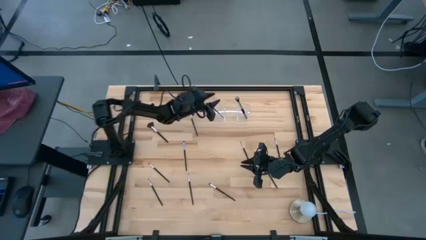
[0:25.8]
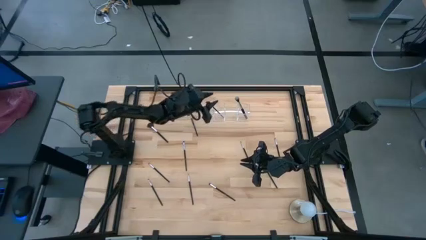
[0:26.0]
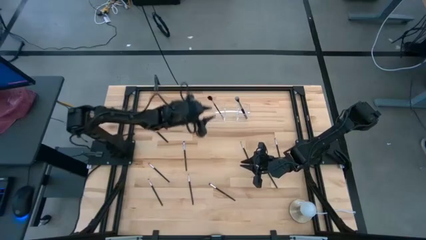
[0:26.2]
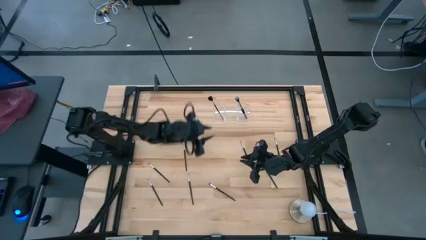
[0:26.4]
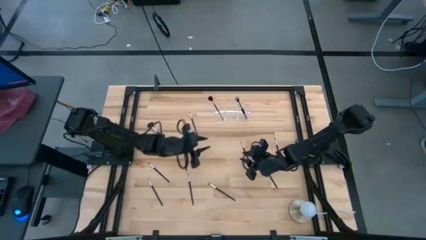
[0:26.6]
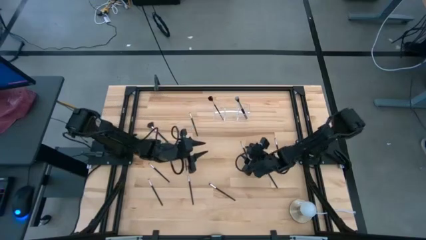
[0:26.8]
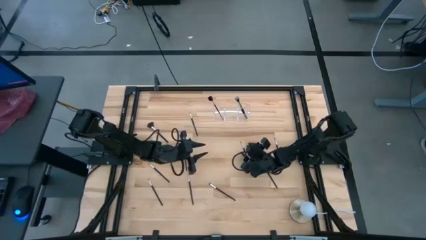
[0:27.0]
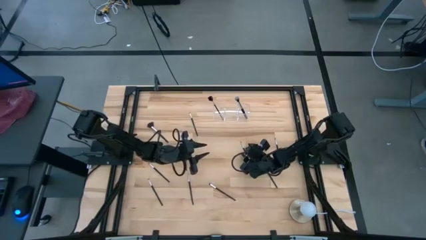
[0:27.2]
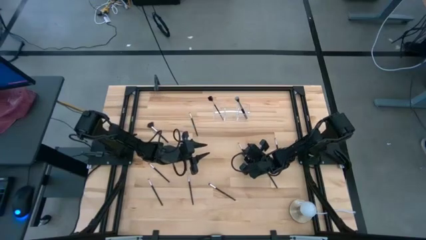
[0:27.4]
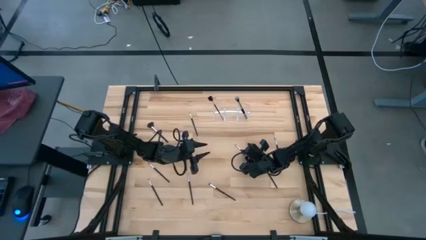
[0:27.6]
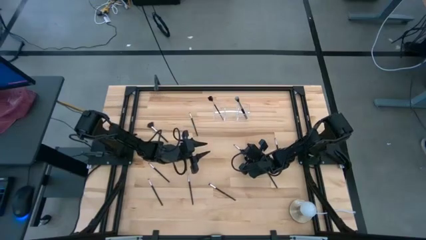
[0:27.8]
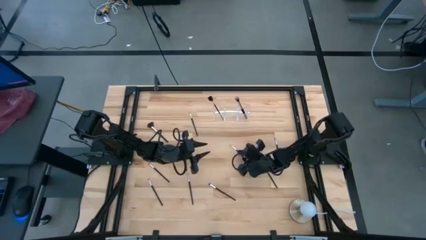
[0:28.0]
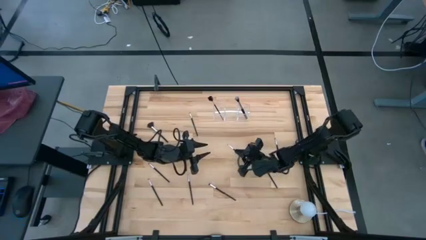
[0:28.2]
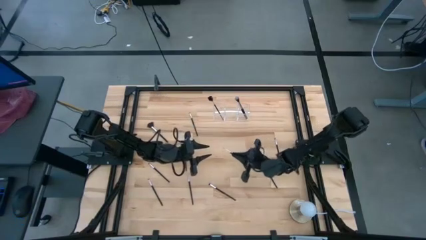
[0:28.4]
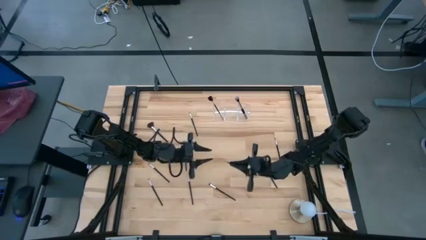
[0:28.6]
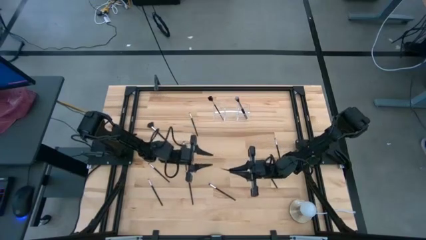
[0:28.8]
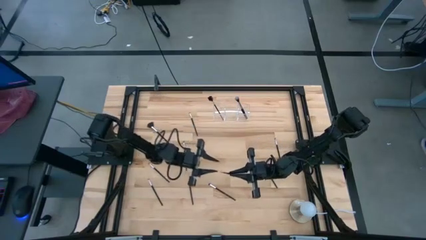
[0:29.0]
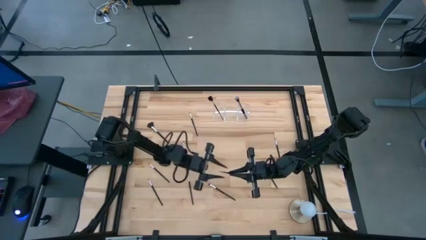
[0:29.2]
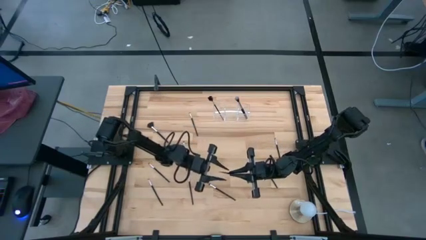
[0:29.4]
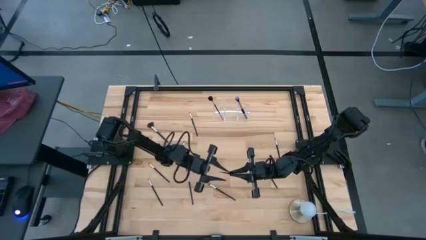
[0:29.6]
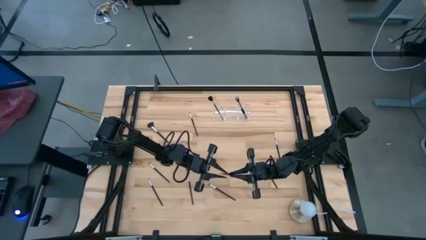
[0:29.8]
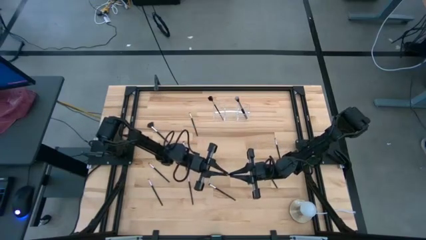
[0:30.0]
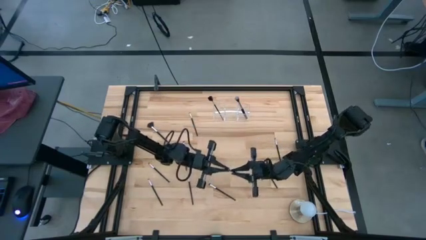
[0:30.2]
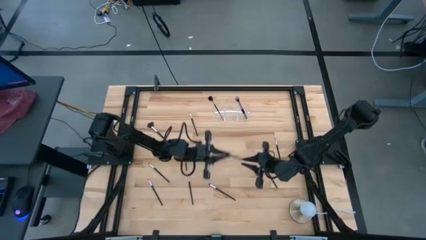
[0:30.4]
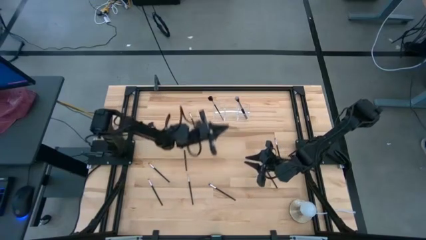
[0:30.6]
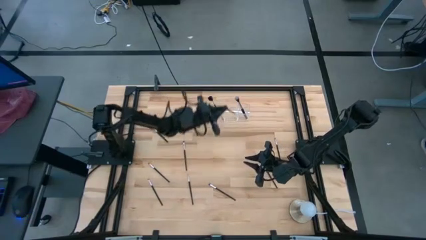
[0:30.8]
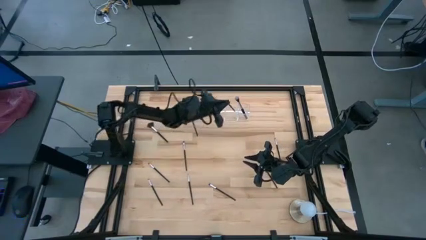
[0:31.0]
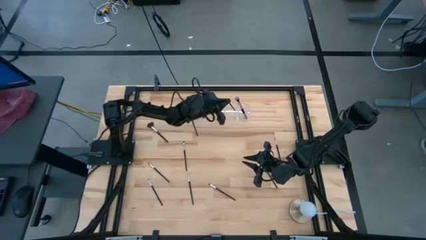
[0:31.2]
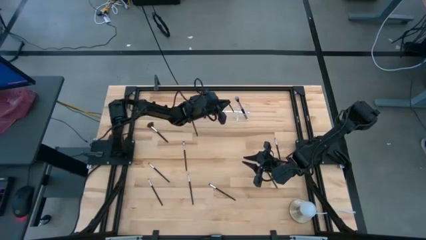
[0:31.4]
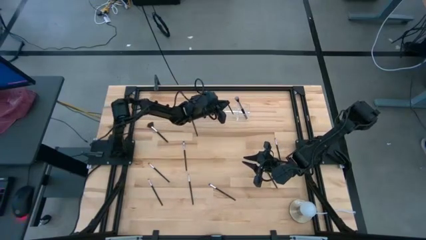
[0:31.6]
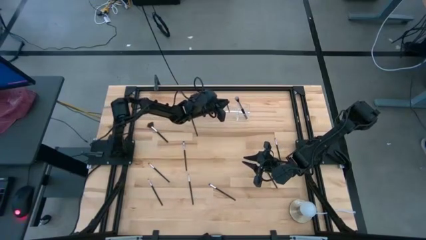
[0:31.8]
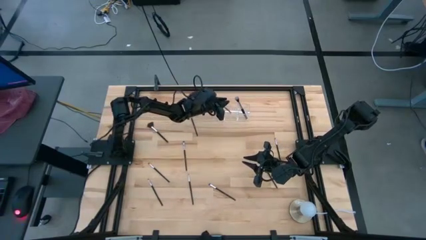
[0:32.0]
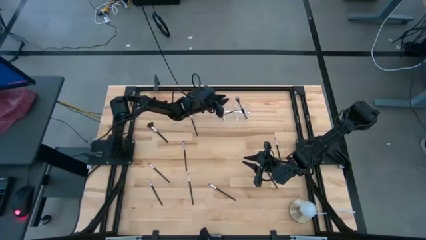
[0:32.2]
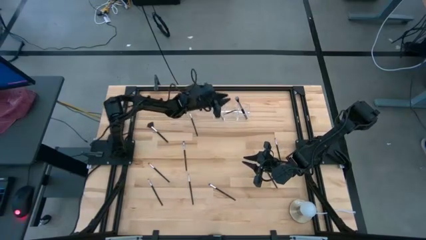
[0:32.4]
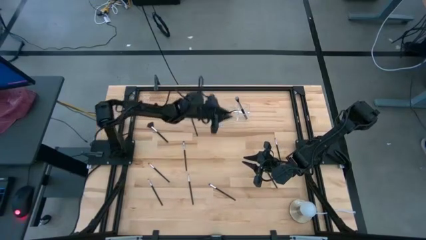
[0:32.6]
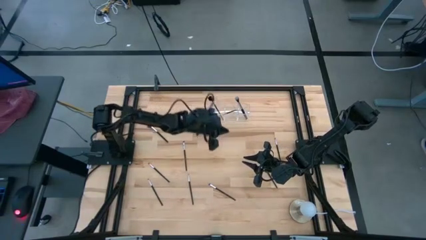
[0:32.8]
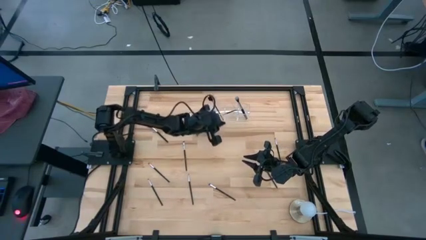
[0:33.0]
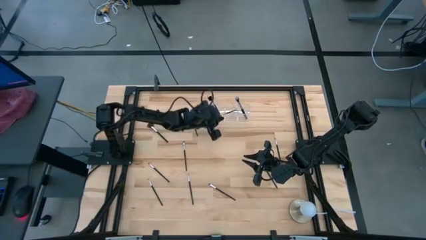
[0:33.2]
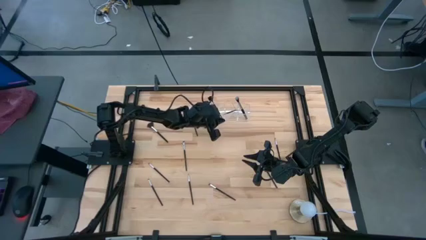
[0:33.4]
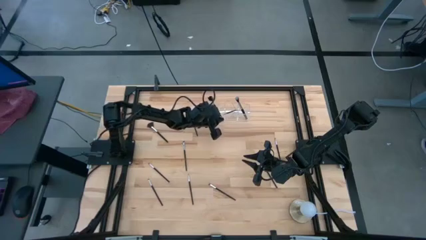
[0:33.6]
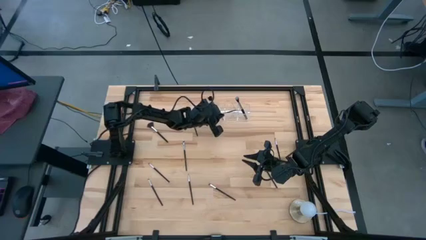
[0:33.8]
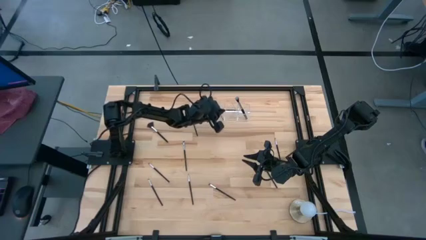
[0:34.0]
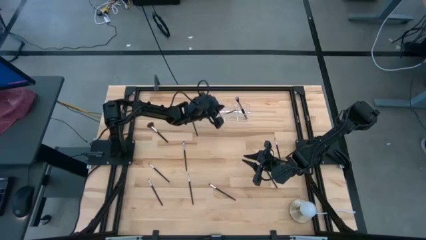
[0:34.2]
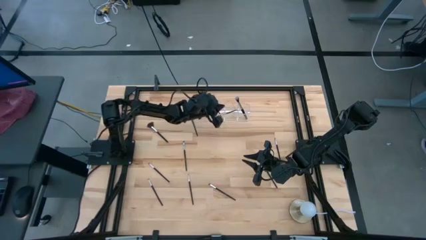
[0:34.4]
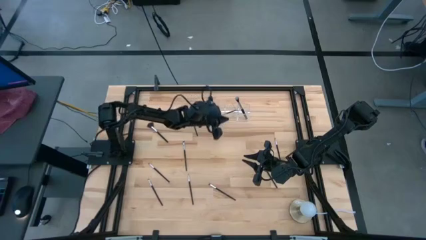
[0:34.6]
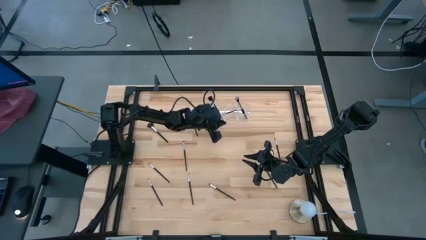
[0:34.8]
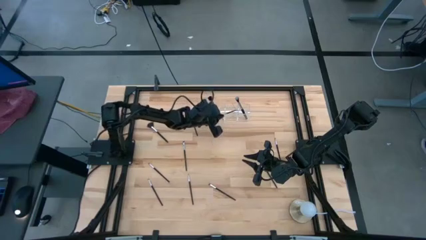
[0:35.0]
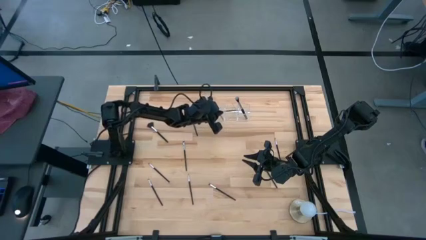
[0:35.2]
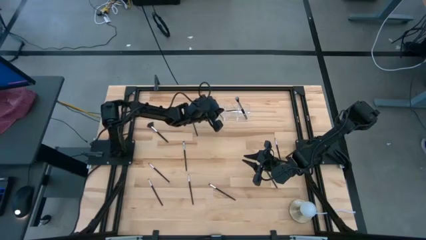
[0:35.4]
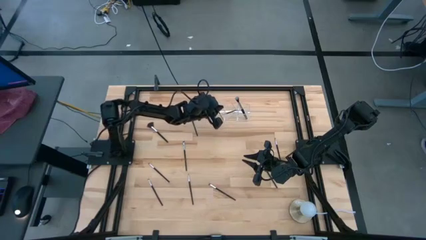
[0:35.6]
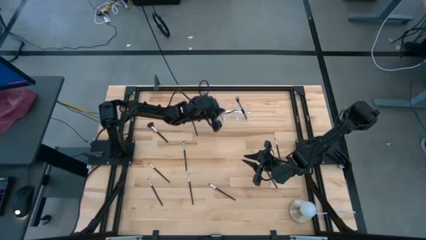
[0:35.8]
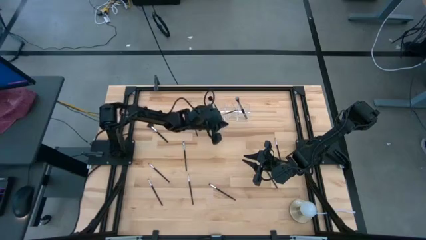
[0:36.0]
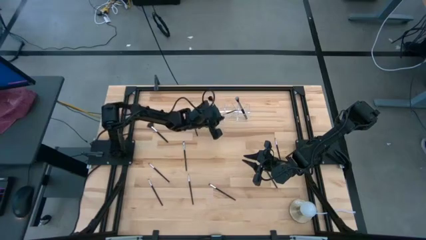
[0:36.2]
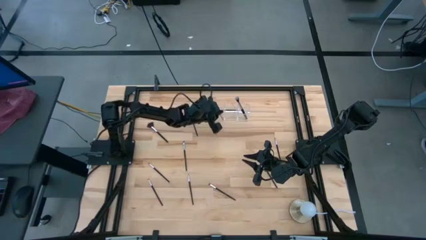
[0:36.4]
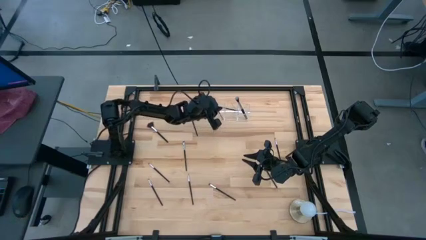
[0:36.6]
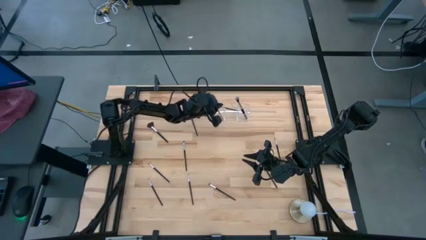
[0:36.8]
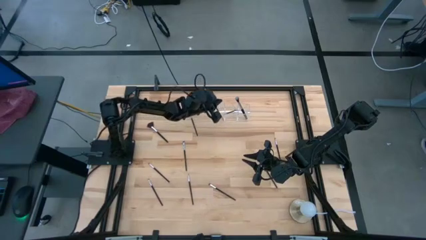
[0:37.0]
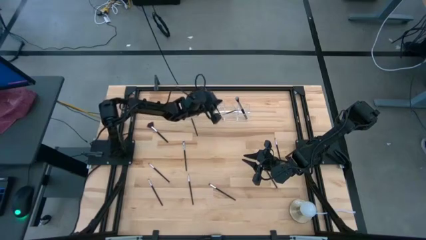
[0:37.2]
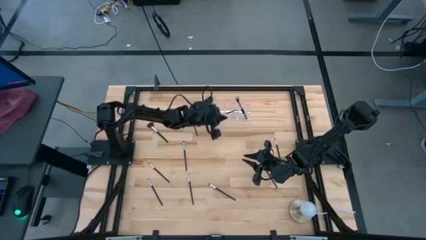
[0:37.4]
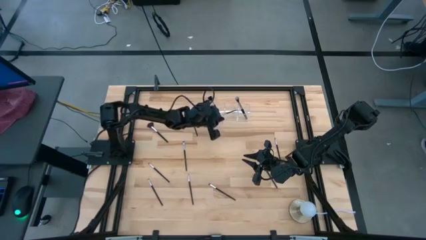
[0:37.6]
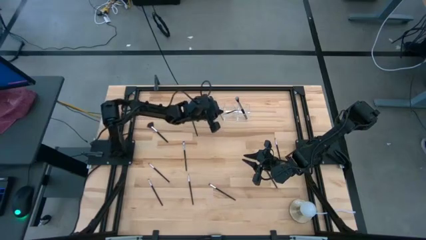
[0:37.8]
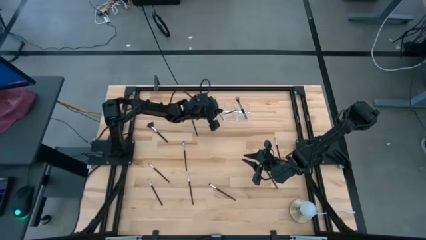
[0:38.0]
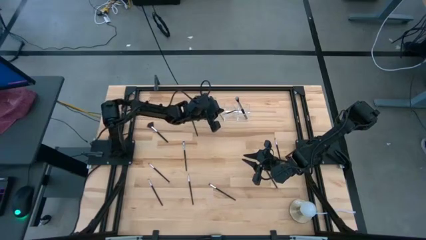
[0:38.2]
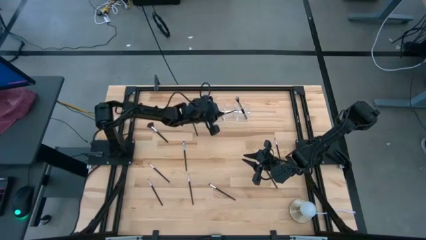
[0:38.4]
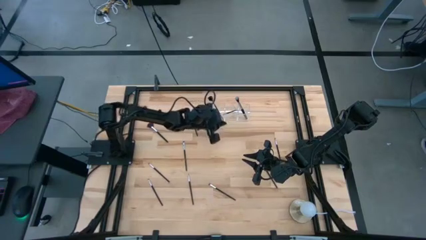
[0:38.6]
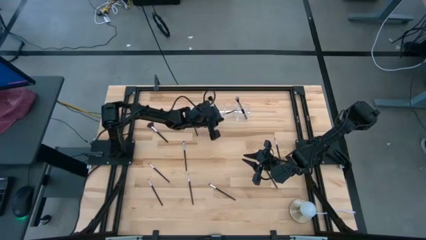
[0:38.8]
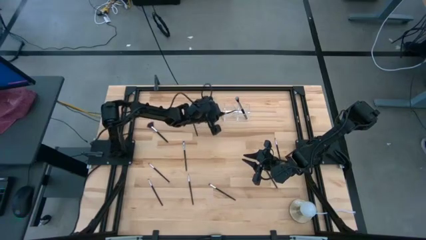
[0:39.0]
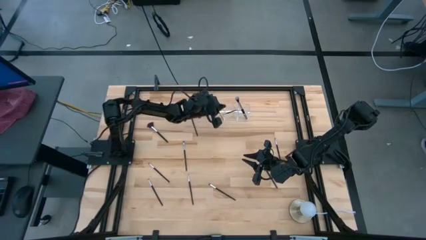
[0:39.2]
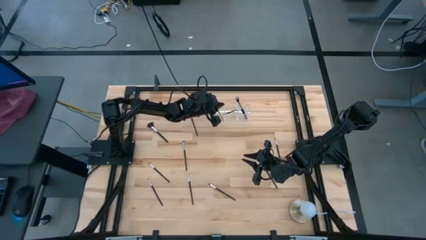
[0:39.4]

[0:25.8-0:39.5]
Task: Put items in baskets/containers
Put the black eyeshadow brush into the transparent organizer

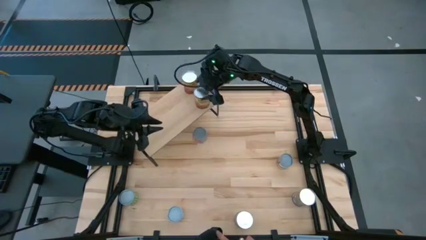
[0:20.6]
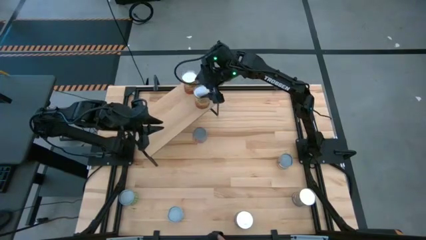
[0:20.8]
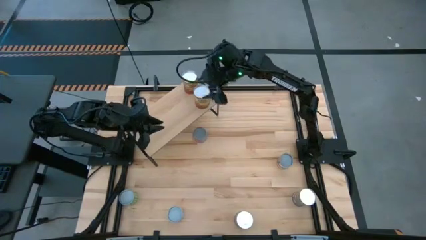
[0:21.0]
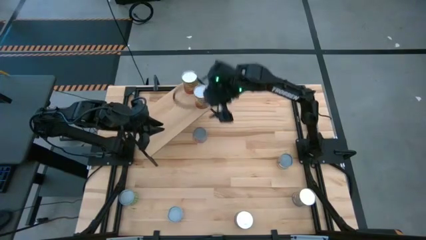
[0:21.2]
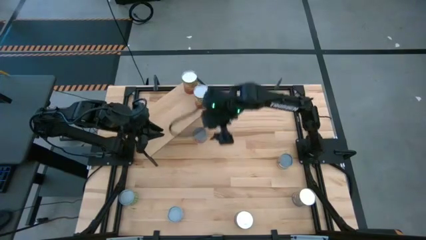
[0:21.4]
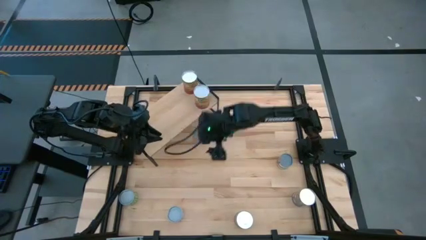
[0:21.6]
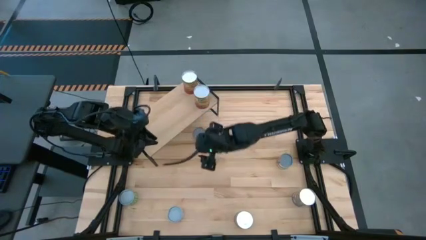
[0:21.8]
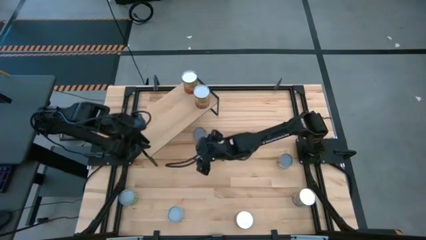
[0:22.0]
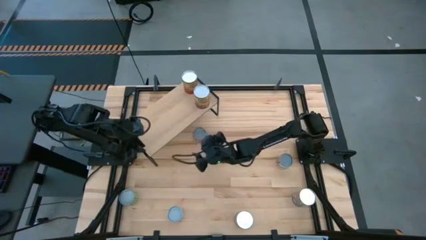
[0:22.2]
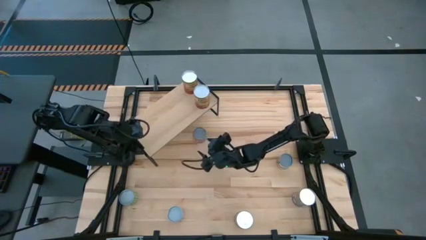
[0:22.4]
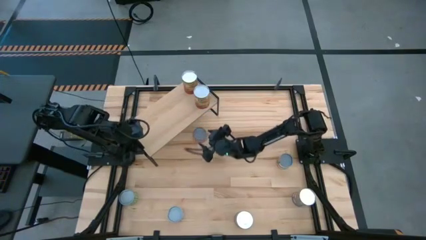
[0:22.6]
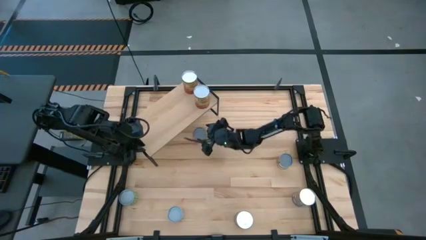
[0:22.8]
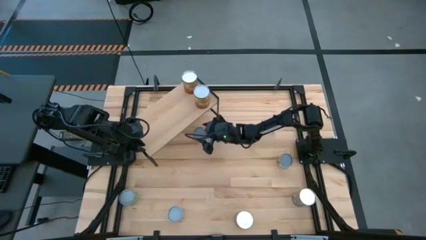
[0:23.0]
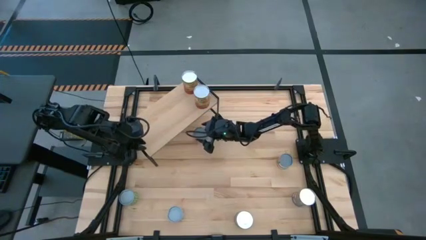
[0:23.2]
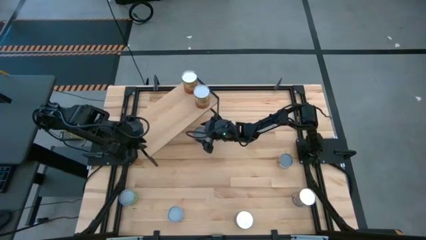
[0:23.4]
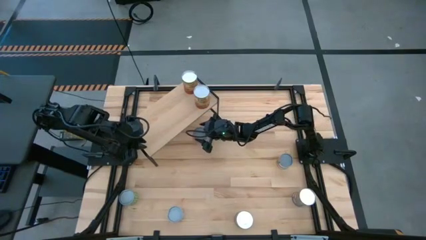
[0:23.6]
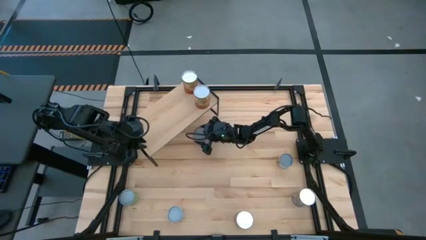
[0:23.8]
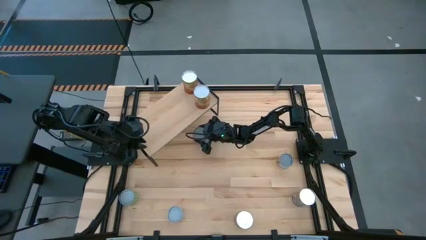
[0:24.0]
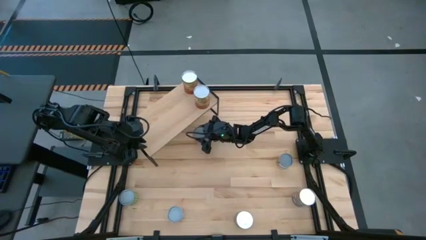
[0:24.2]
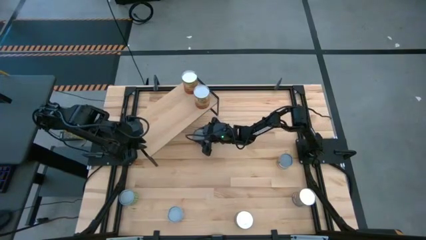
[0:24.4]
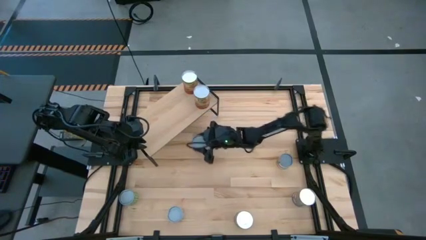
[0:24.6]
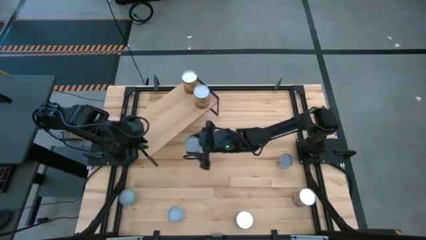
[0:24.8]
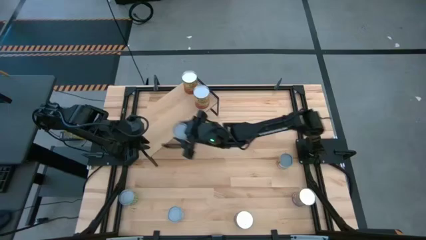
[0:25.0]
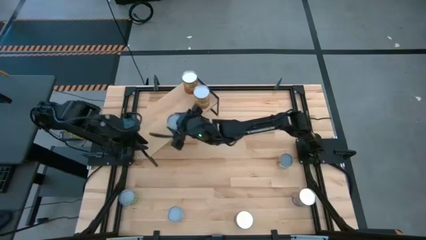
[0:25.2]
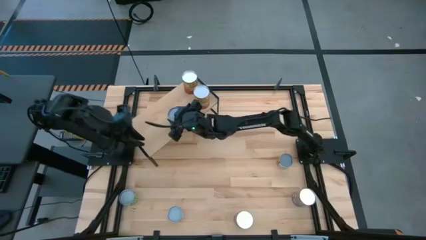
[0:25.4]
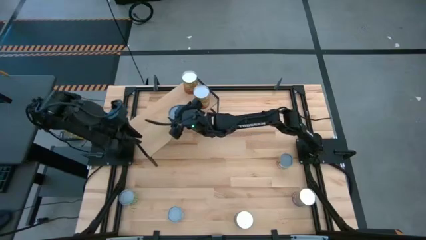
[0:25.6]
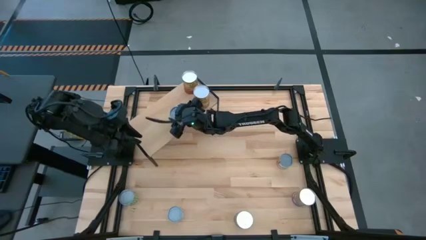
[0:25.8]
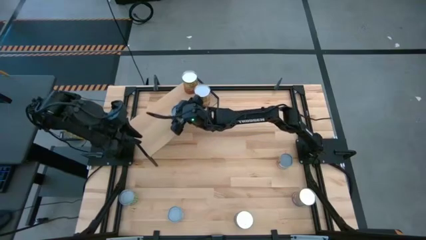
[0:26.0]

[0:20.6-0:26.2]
Task: Pick and place cans onto a shelf
Put the small canned corn on the shelf
